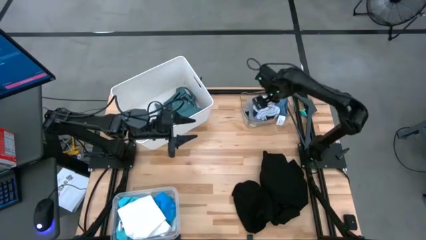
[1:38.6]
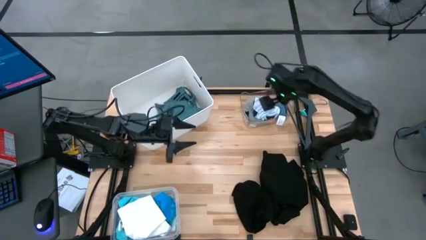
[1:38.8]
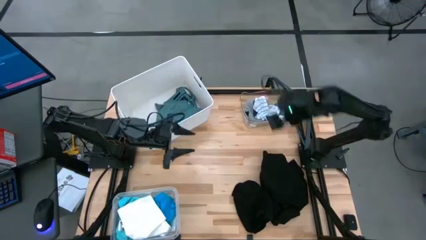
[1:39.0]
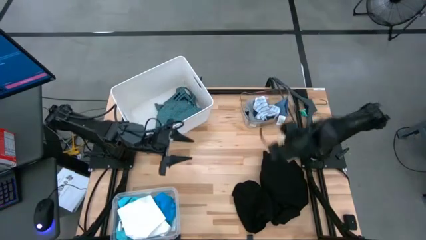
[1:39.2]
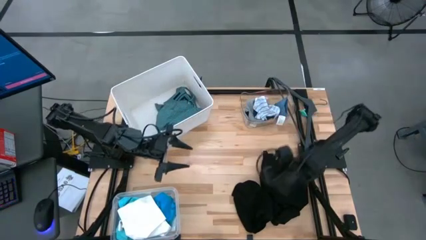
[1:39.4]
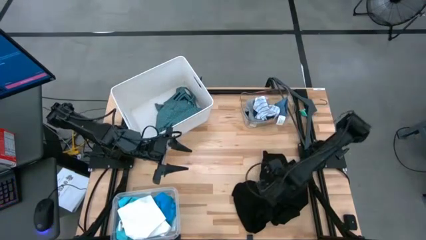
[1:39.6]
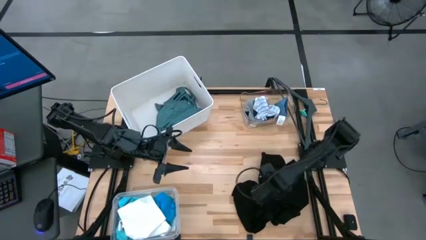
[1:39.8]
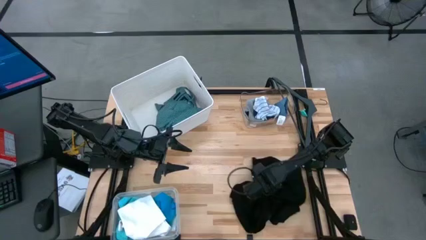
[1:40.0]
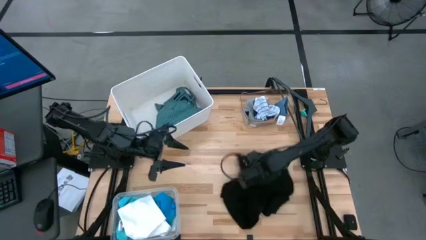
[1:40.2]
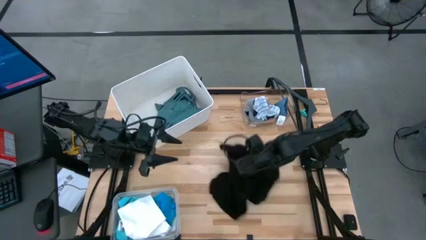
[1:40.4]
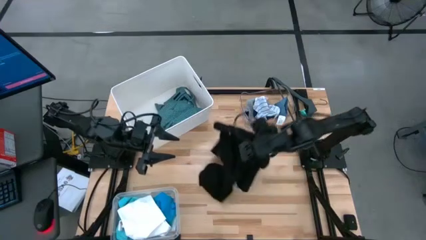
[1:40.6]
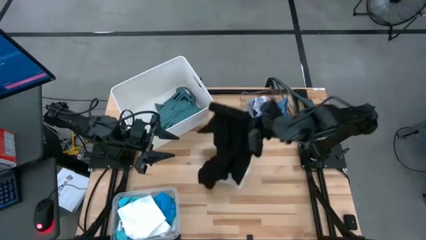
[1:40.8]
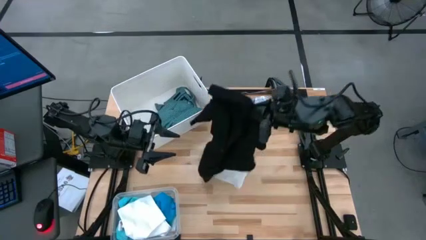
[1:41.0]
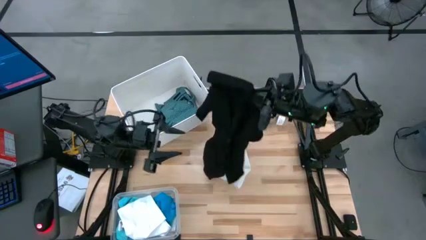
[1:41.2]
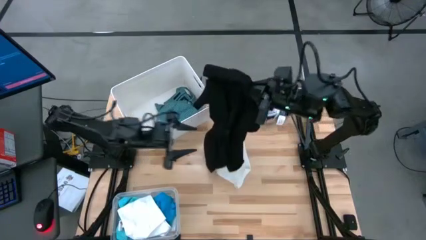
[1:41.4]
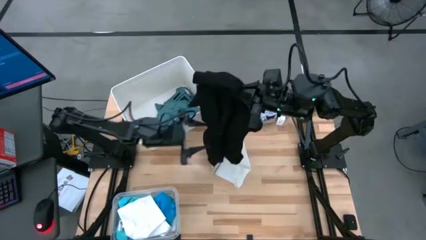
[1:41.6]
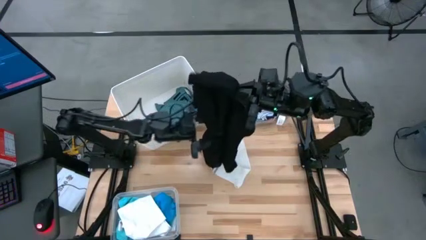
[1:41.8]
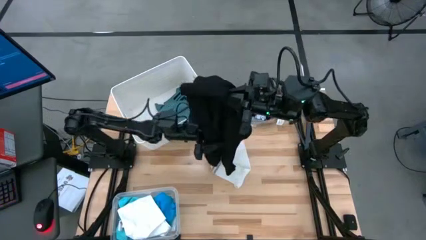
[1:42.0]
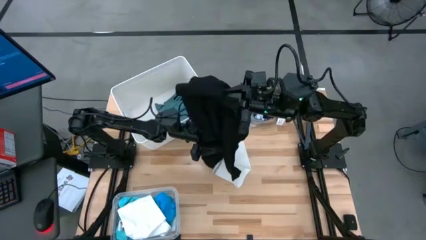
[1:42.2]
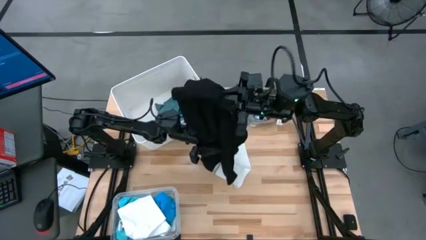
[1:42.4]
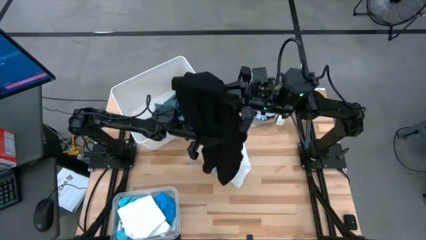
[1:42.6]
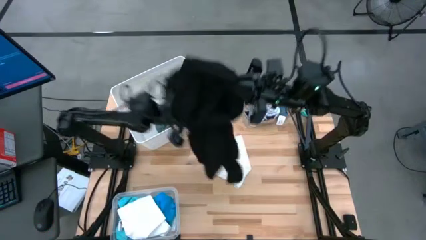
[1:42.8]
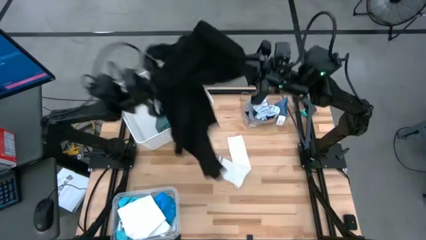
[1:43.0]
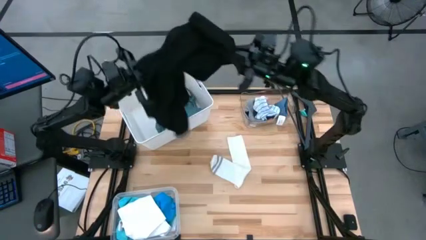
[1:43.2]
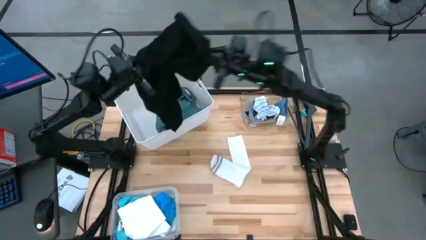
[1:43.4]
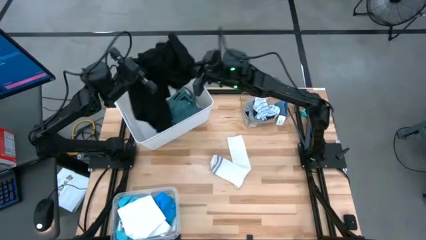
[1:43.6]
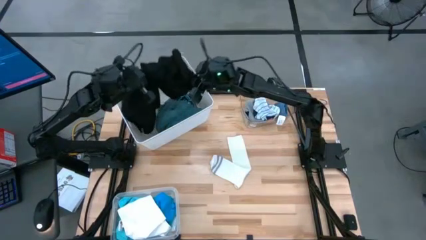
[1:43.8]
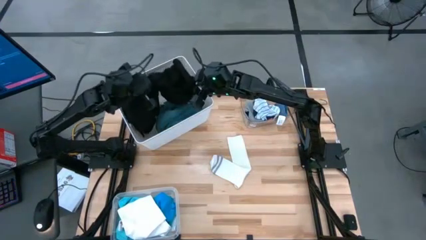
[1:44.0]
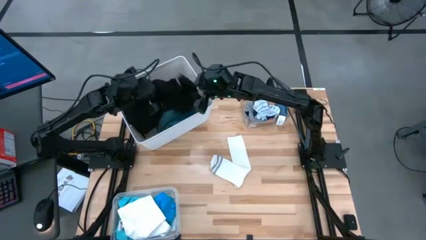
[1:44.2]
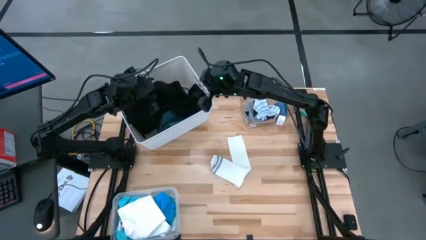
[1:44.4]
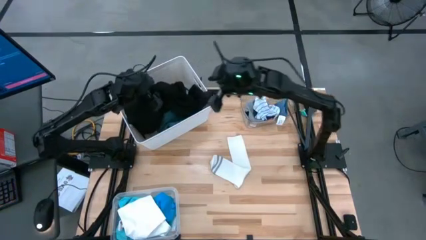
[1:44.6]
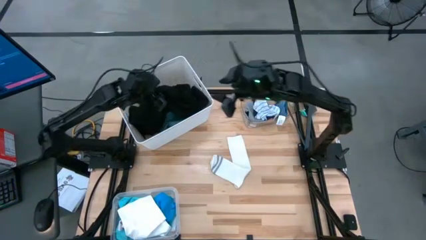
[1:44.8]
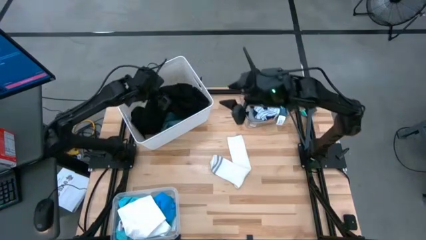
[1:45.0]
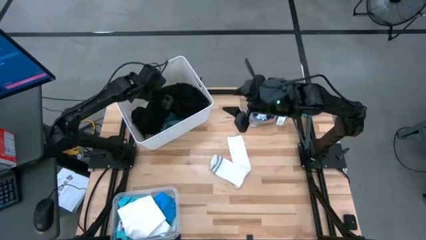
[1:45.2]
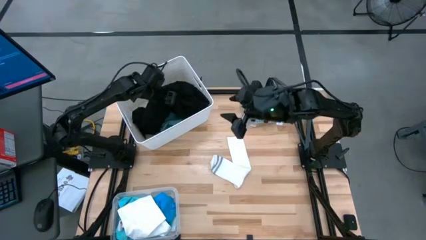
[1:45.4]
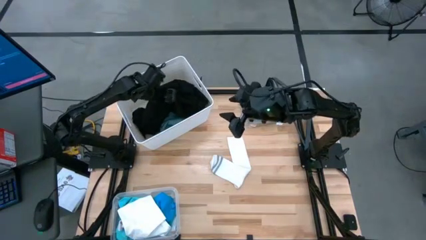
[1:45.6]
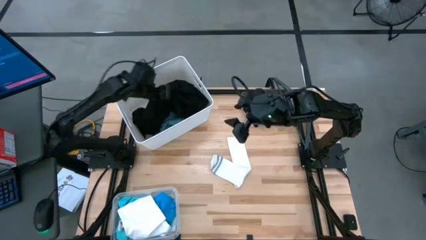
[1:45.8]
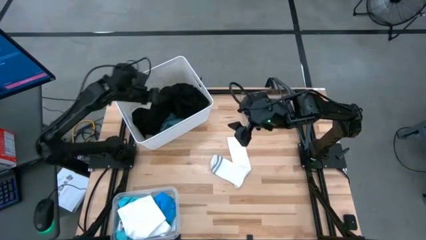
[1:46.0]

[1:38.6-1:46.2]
Task: Pick & Place Cloths
Put the black shirt into the white bin

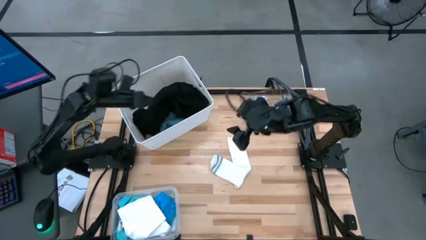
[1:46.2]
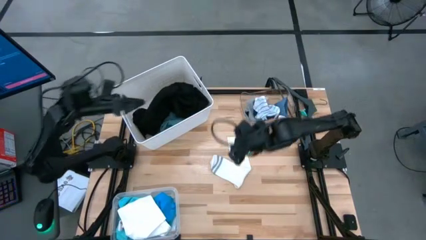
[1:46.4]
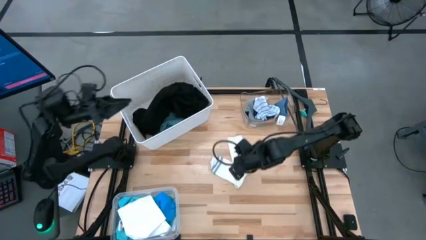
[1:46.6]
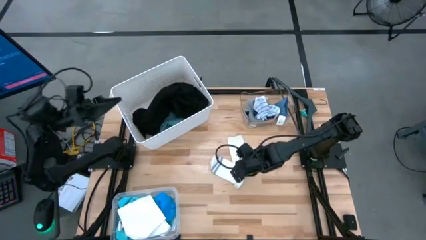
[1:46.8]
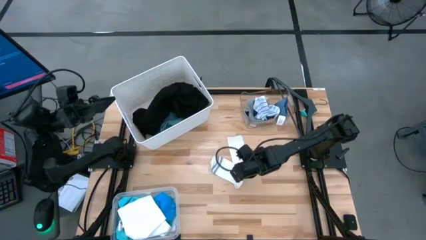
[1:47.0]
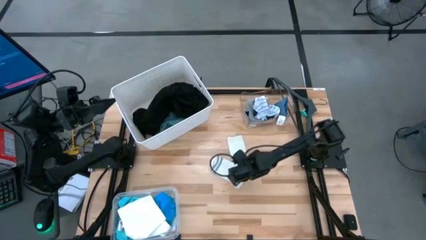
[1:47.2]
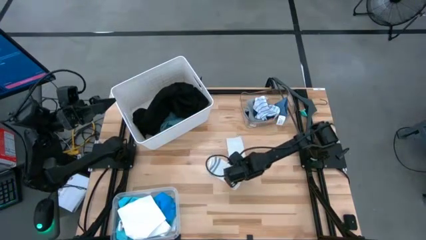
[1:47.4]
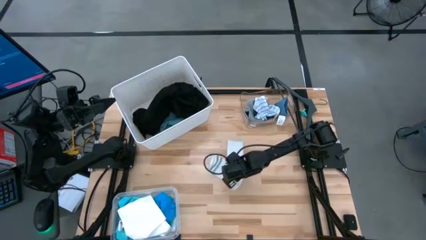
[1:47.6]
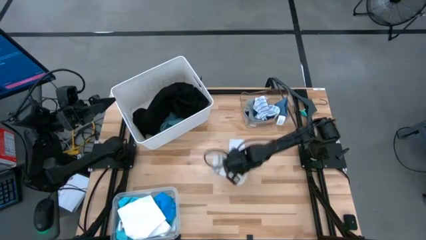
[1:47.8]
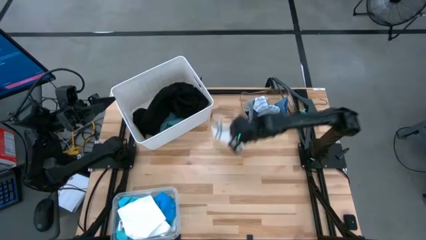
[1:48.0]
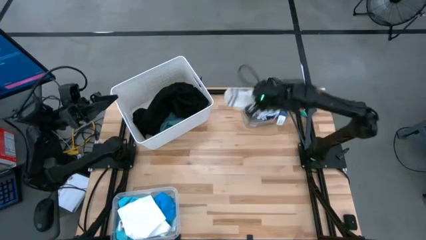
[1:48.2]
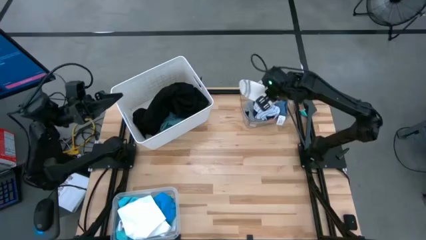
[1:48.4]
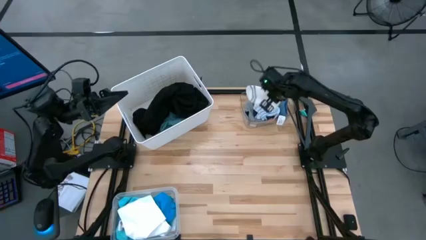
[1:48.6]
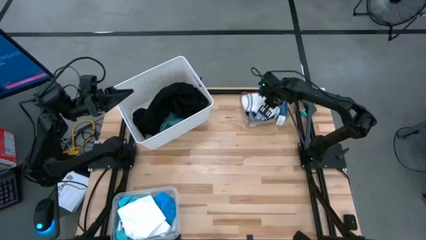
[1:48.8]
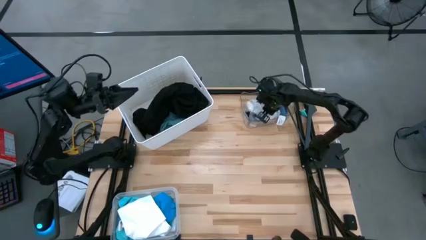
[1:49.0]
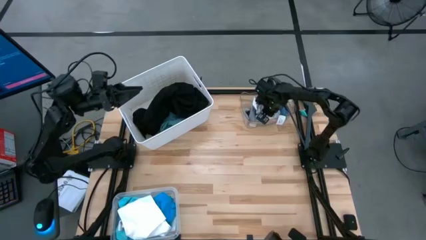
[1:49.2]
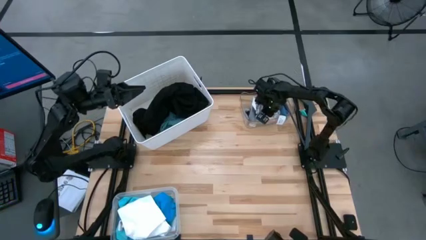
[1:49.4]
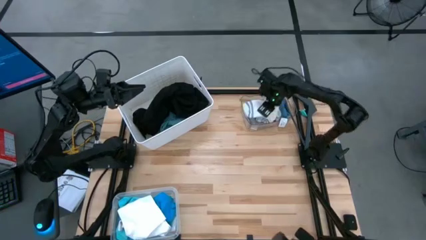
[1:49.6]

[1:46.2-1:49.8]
Put the white patterned sock into the top transparent bin

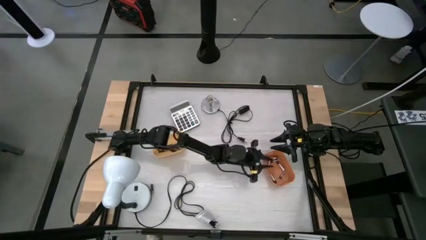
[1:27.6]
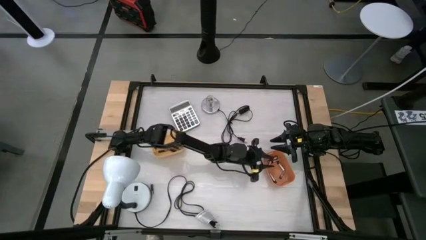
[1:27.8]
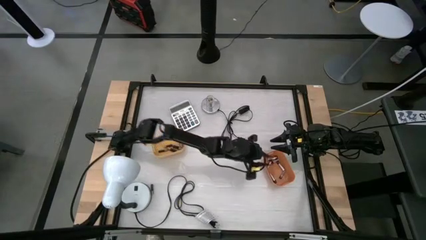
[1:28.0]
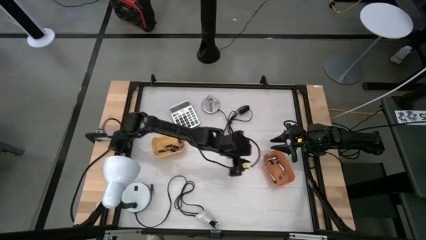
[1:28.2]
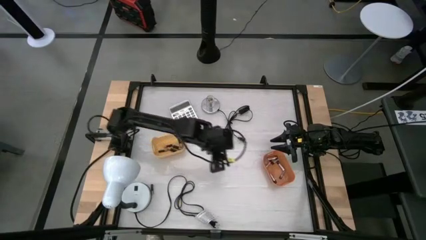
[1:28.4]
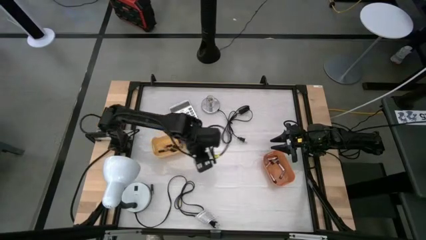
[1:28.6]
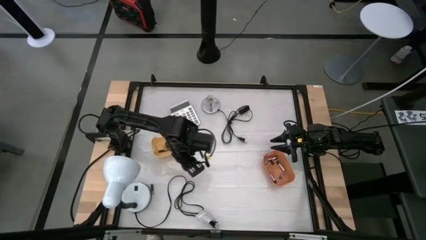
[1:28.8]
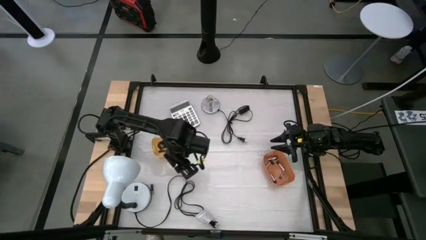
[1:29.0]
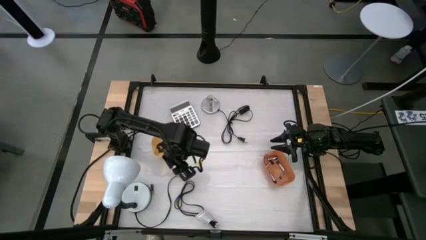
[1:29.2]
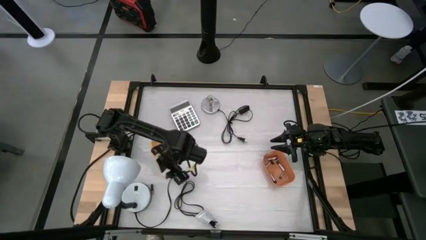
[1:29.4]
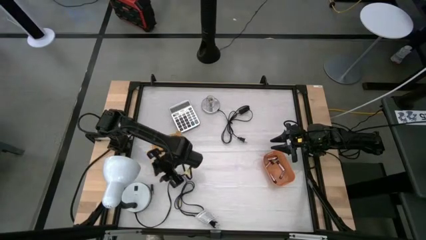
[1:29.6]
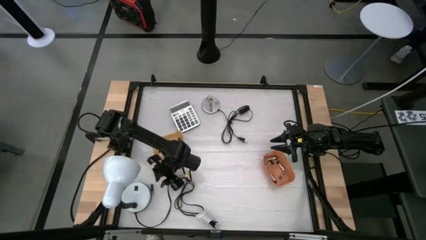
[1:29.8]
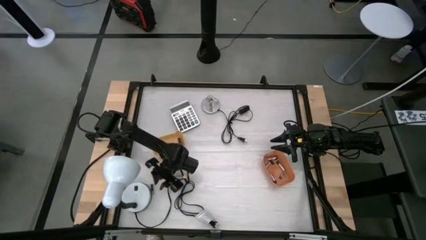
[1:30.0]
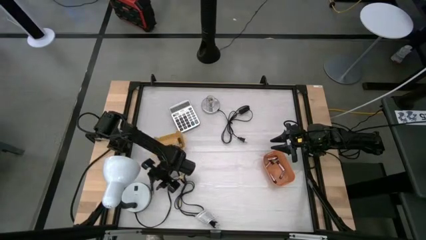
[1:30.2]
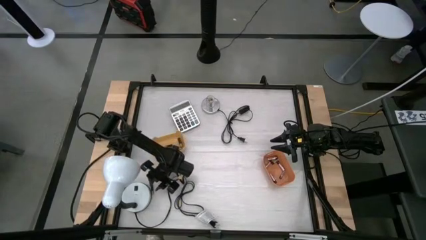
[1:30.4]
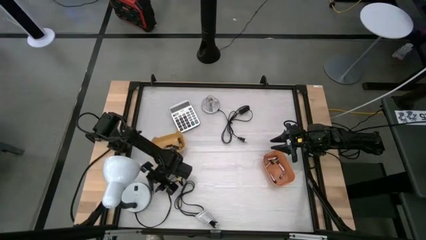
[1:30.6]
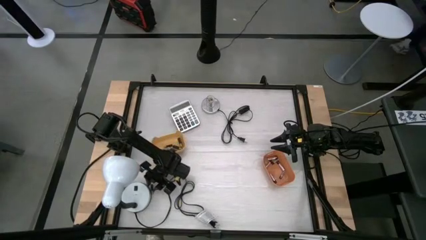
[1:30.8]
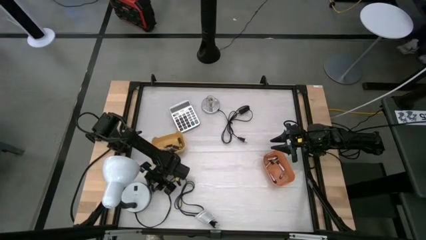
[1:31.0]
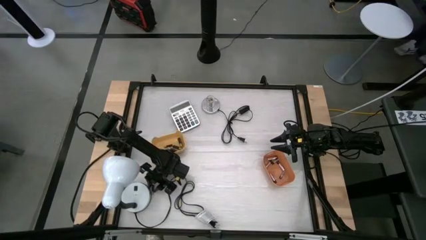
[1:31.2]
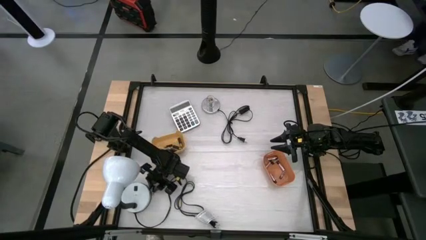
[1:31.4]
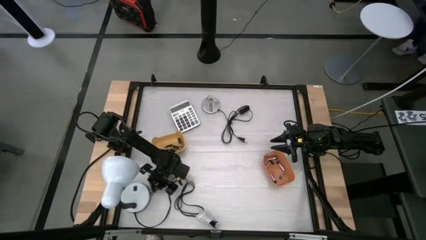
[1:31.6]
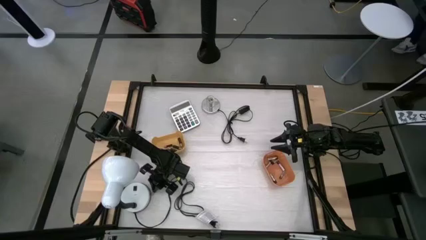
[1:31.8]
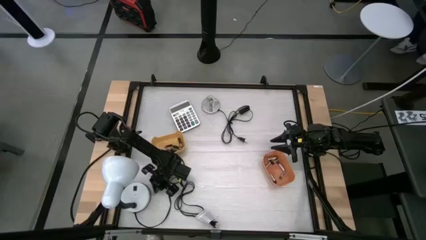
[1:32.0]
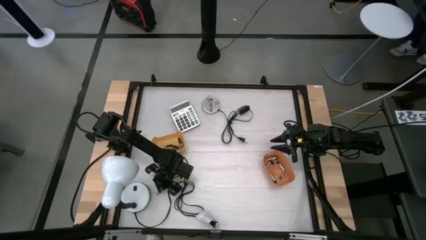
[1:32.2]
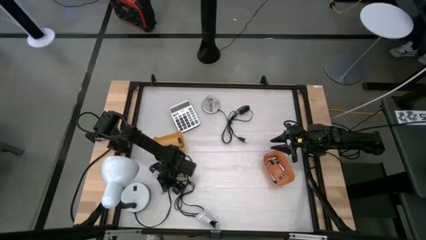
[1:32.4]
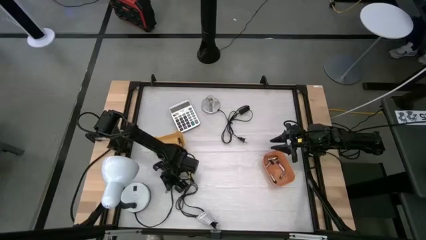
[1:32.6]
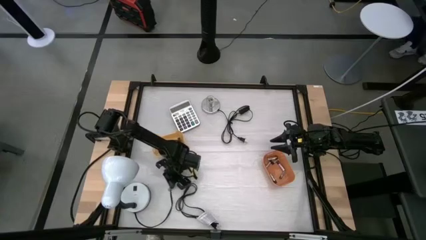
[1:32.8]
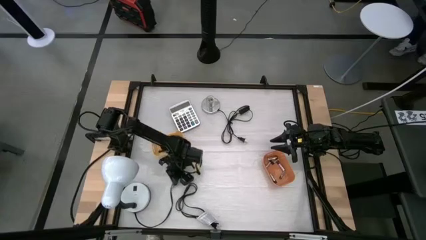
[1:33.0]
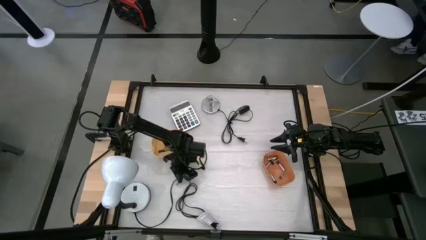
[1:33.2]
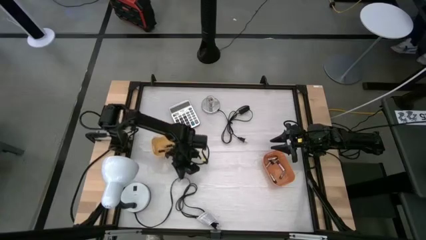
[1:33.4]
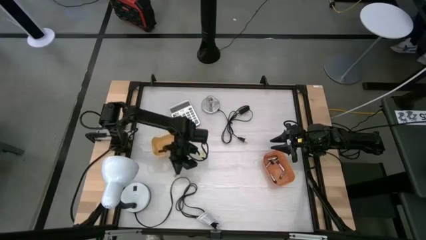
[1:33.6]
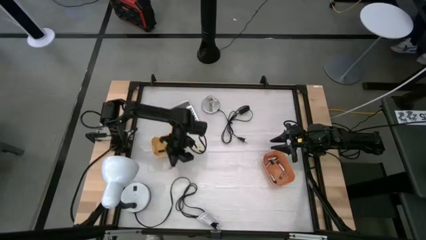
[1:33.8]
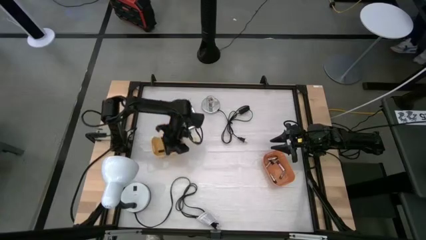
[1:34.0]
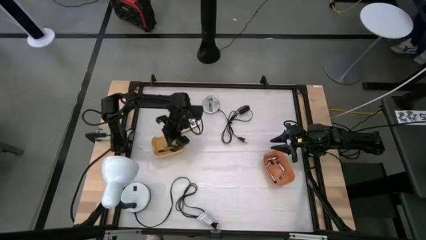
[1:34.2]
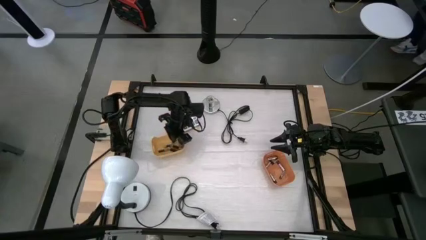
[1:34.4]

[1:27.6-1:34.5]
Task: Sort batteries
Put the black battery into the yellow bin
